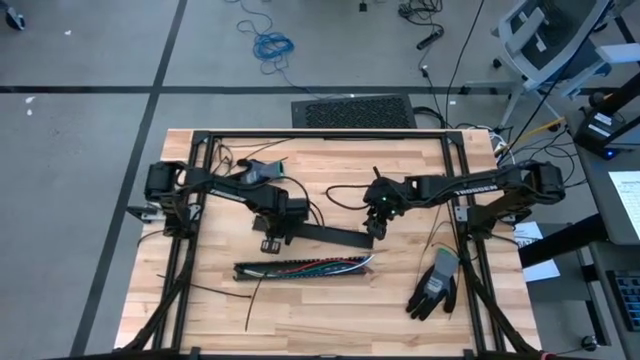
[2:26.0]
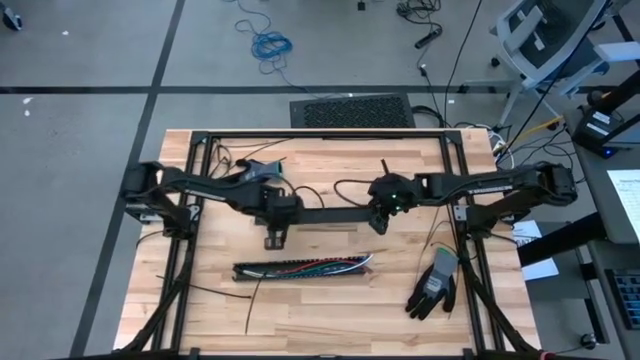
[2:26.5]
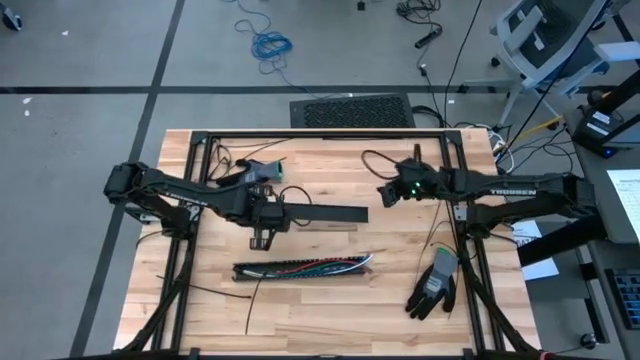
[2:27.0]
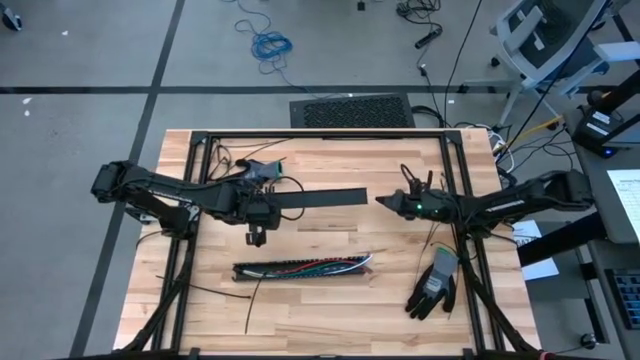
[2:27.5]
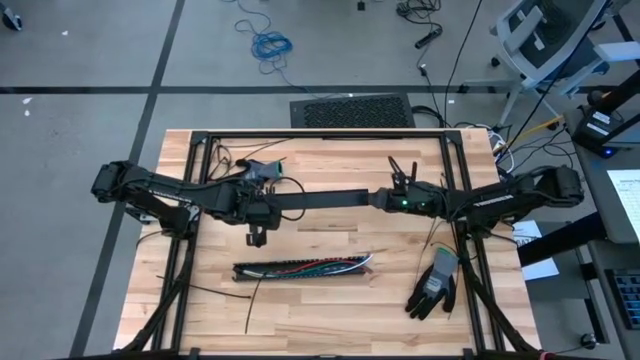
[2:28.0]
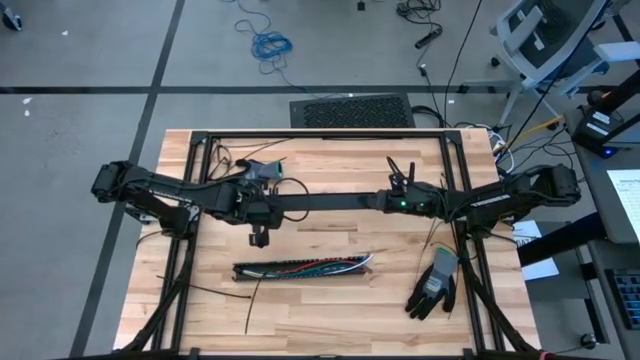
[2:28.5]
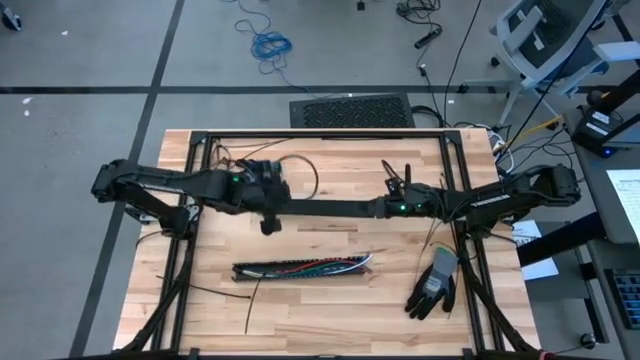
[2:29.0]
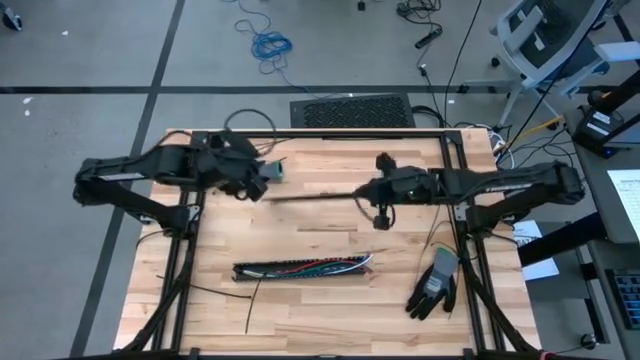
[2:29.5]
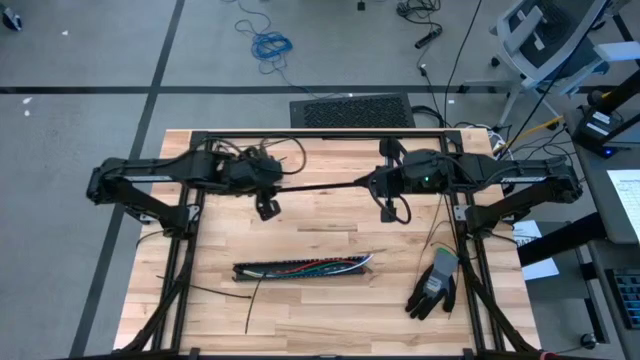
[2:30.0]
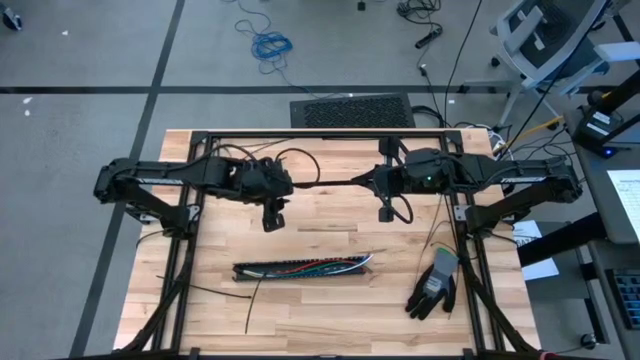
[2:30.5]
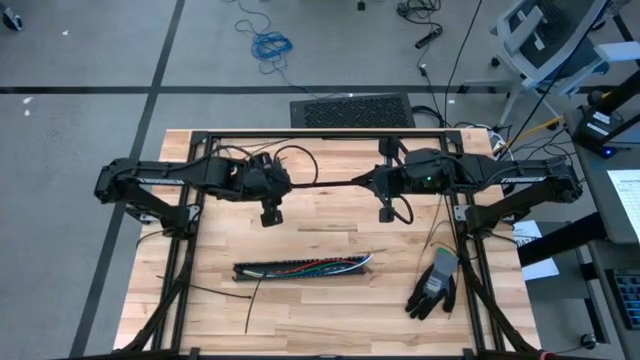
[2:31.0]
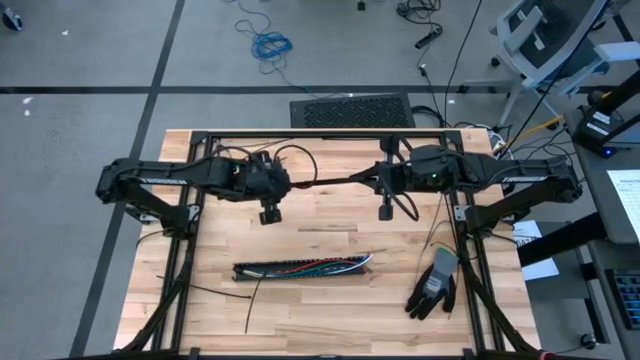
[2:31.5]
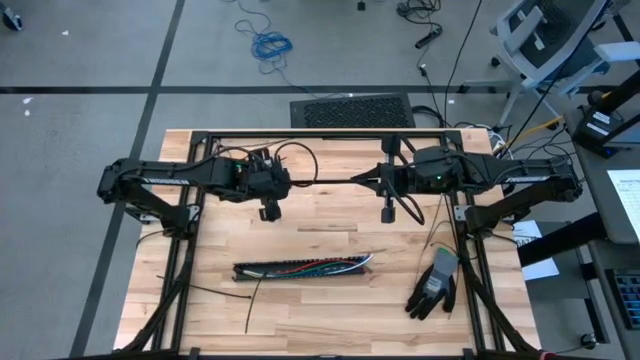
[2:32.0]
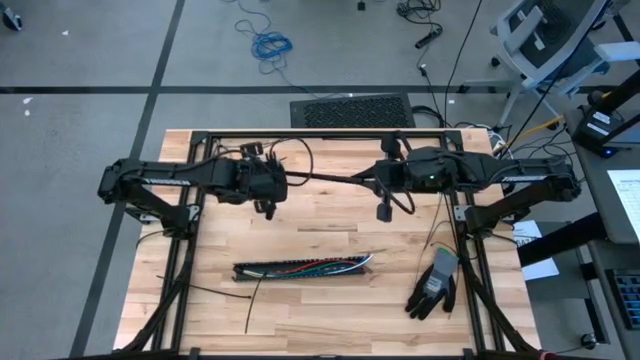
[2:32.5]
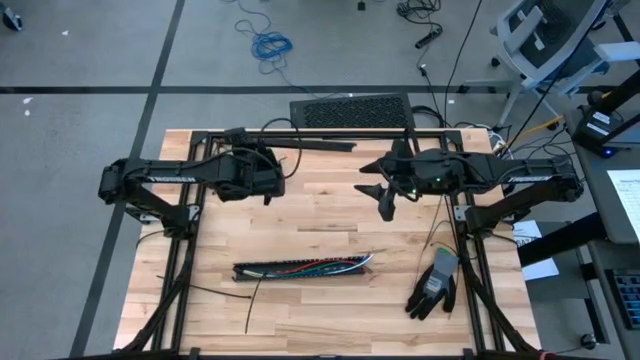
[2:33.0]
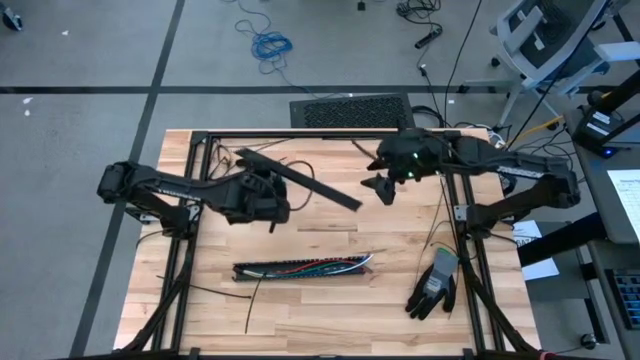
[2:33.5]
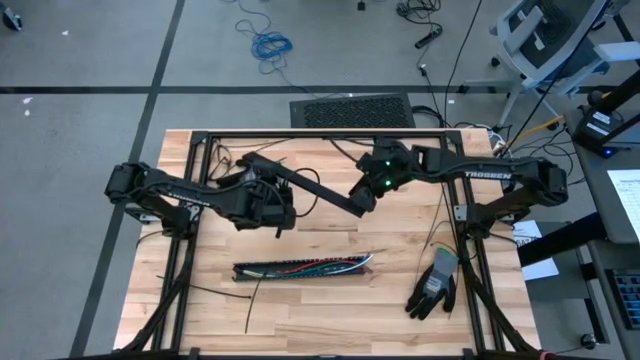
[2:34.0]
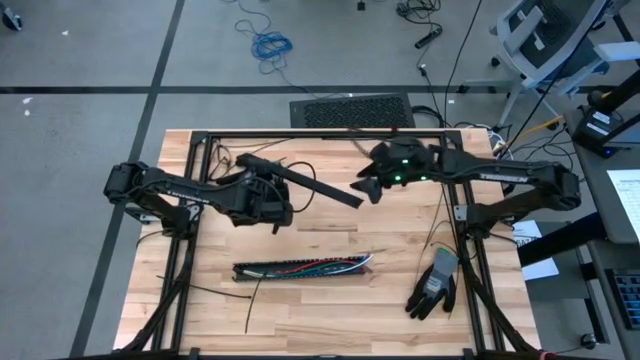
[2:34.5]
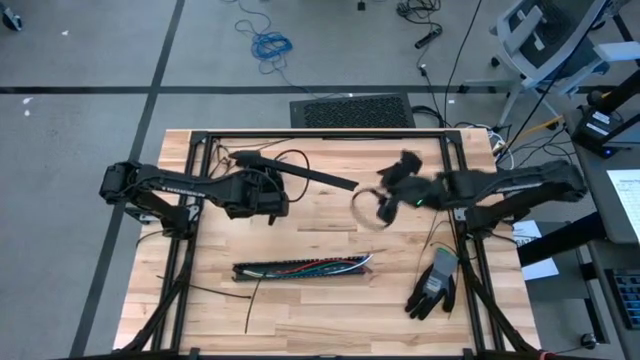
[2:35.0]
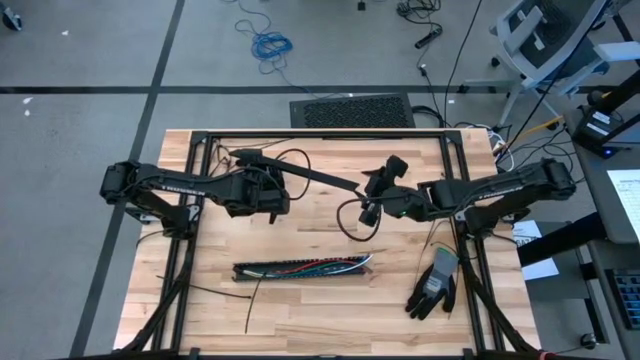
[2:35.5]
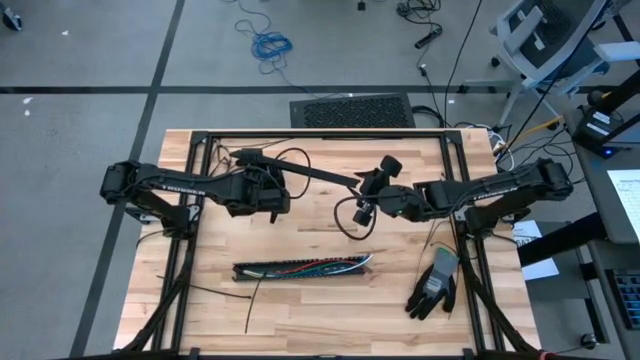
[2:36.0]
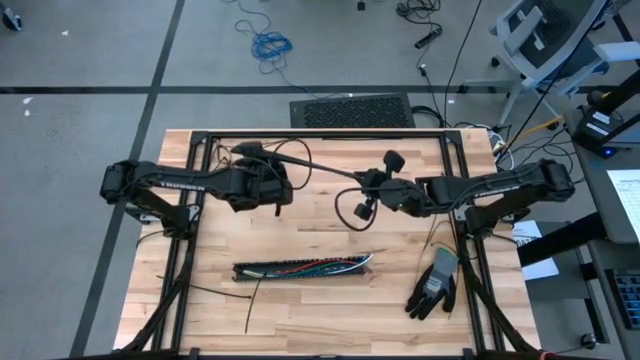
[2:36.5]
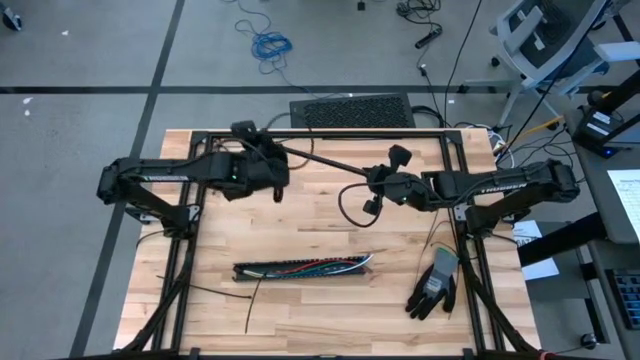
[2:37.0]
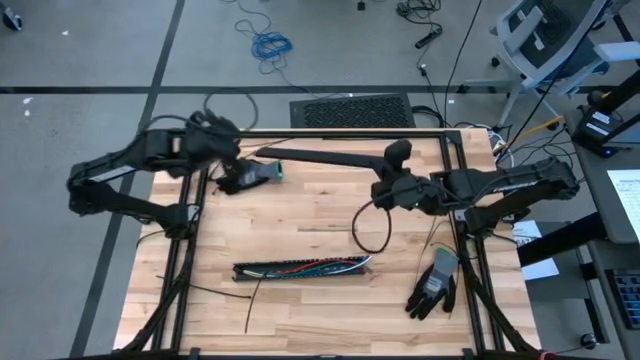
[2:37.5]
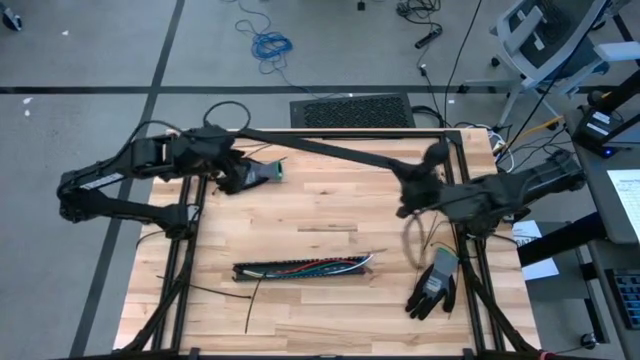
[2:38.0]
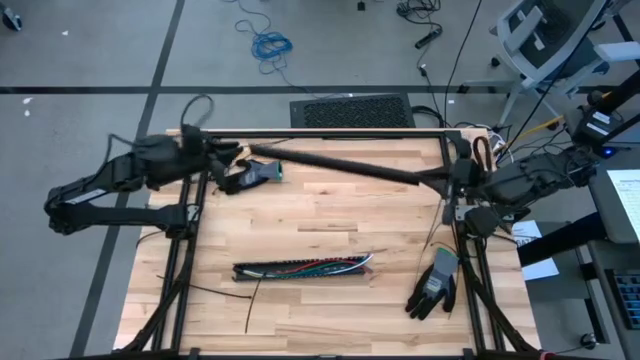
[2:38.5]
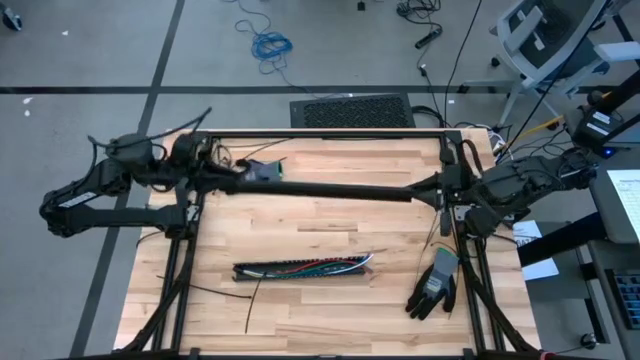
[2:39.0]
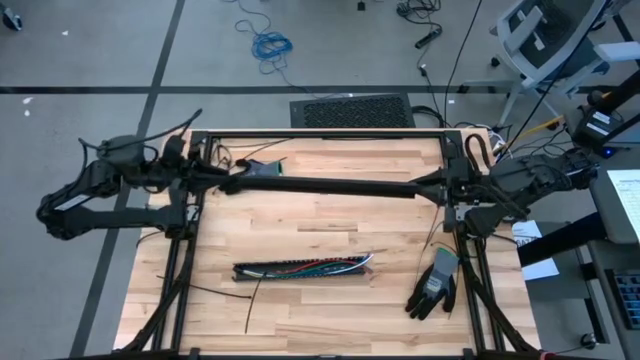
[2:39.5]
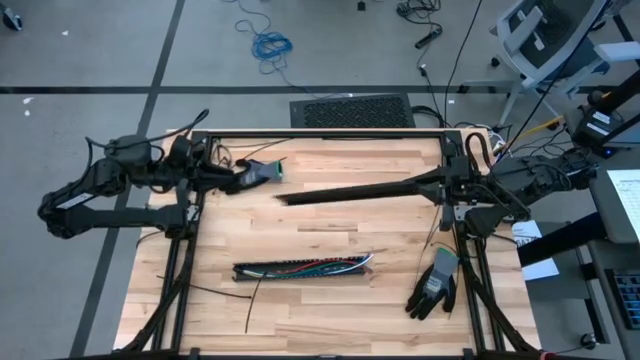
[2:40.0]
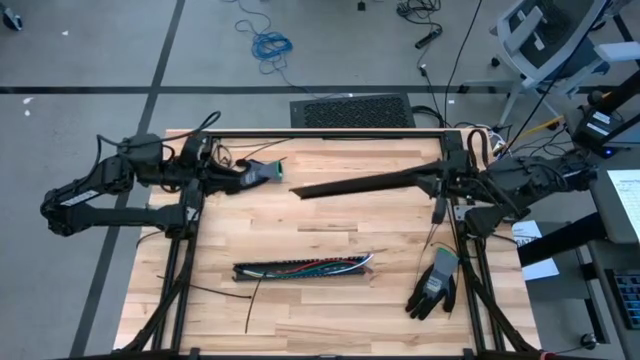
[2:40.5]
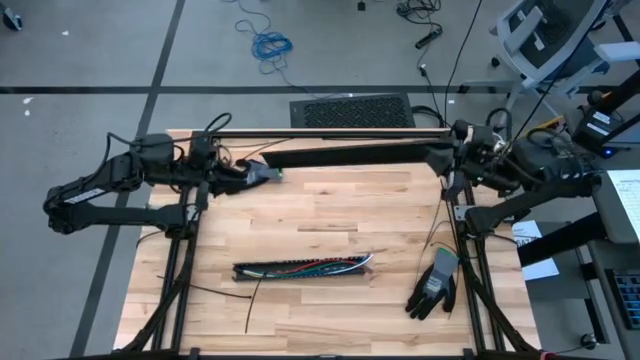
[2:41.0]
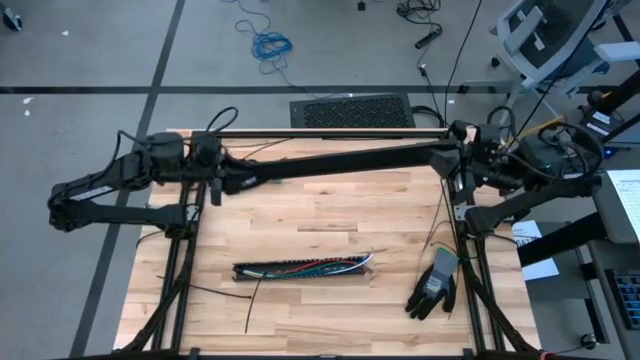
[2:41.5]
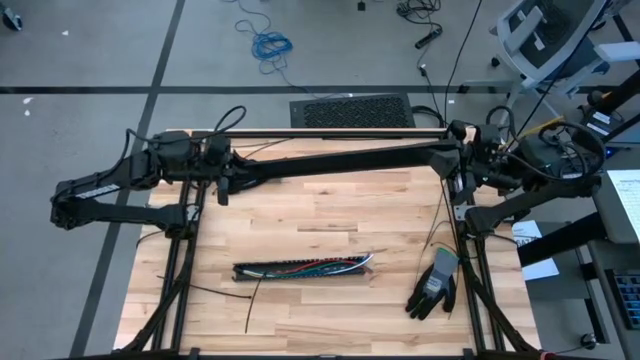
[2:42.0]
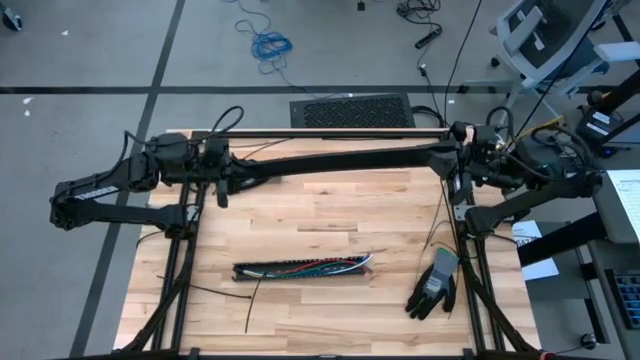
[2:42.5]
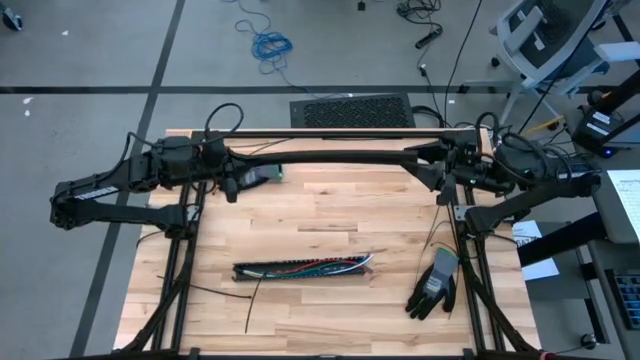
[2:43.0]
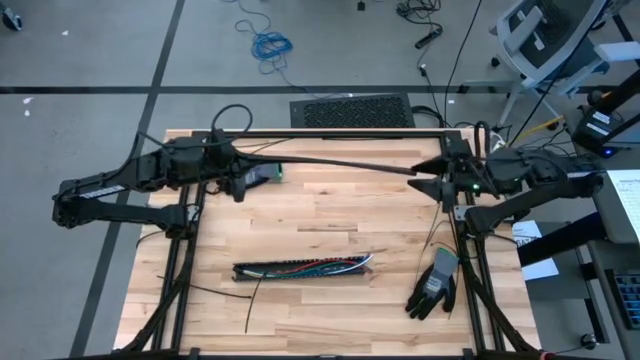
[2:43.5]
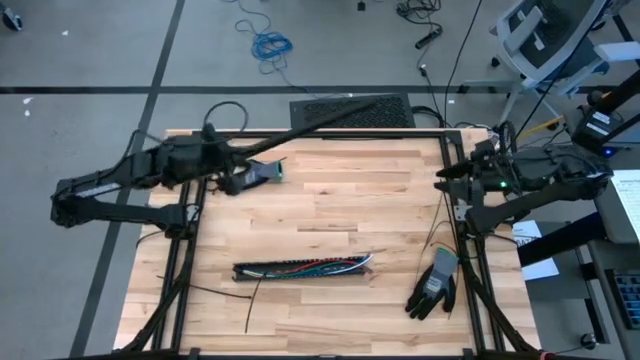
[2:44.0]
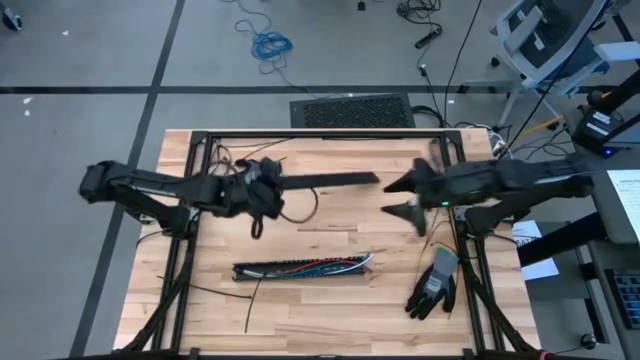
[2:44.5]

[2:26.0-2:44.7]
Task: Ziptie cables
Close the black cable duct

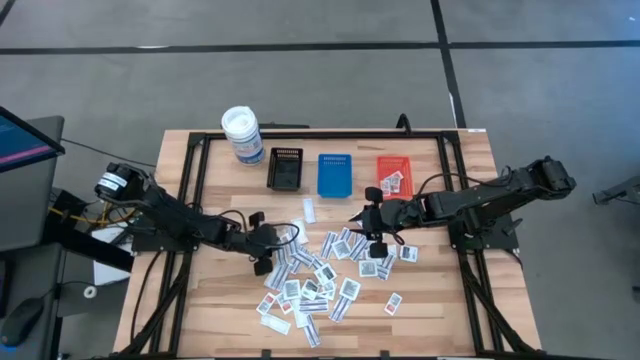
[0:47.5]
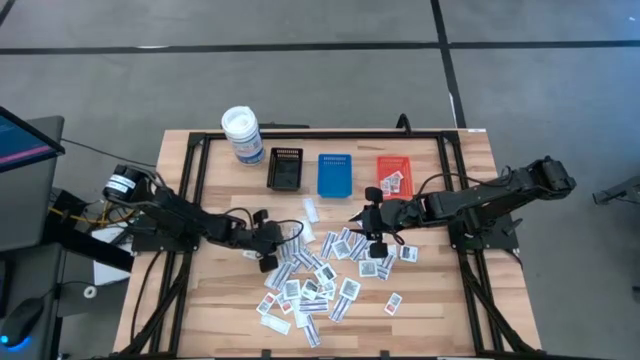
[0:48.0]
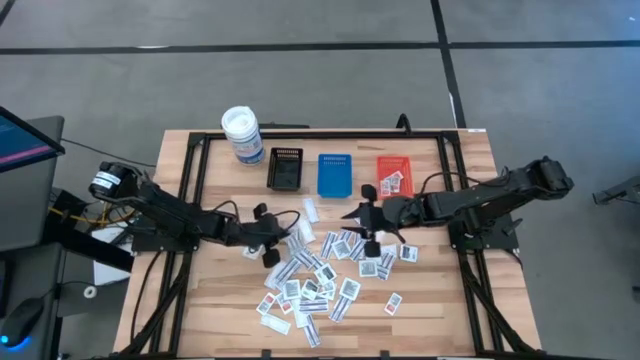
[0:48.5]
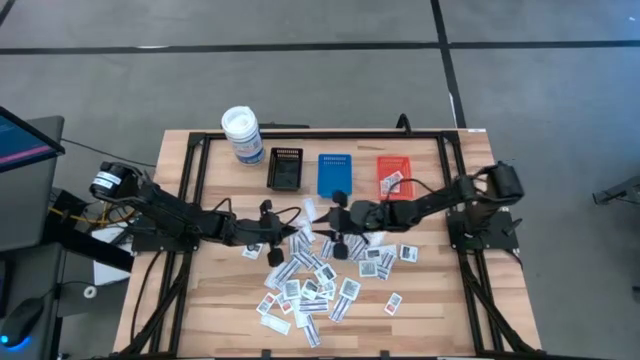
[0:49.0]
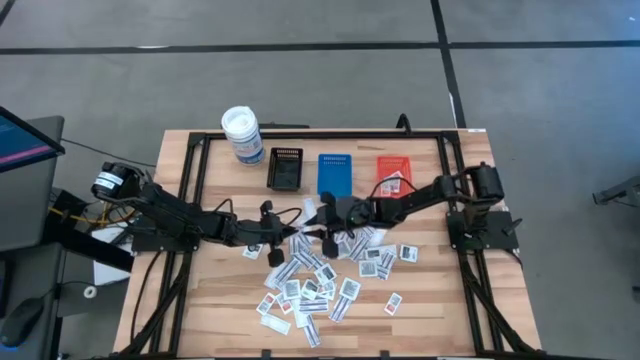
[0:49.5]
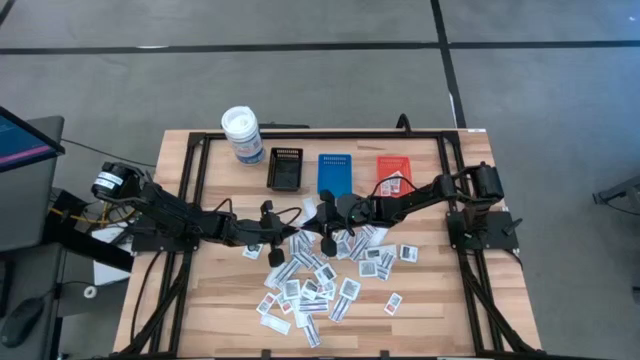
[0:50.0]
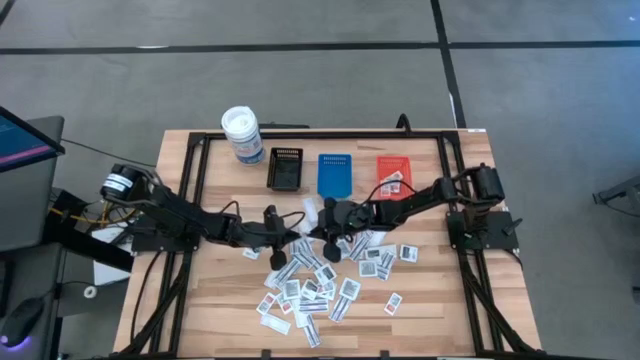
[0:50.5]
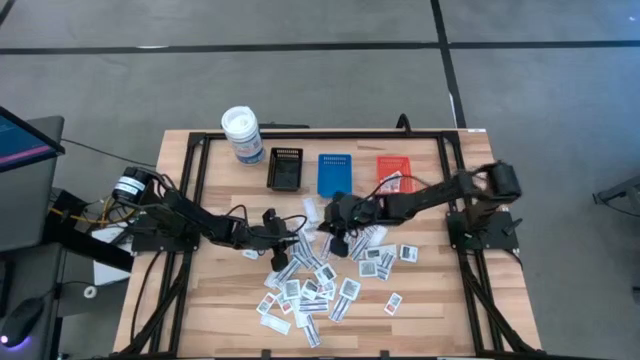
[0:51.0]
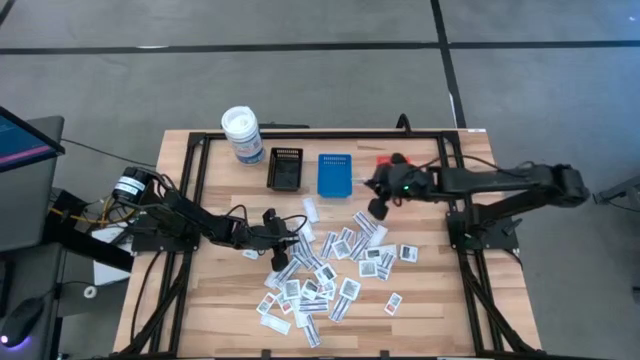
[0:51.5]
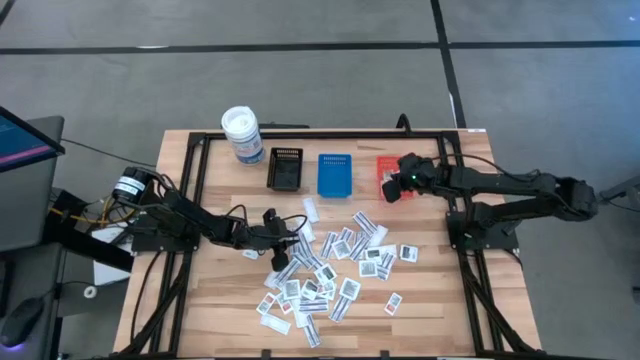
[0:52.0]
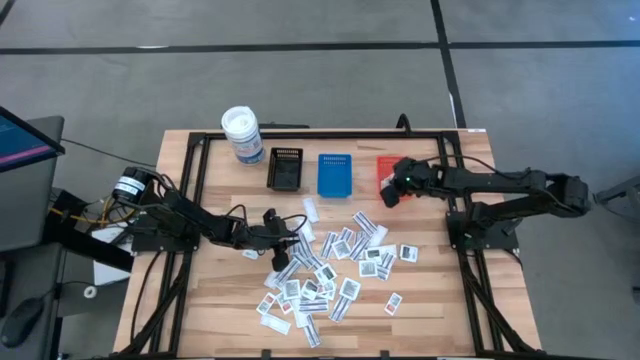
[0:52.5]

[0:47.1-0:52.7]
Task: Pick & Place First Aid Supplies
Put the orange ointment pack into the orange bin
